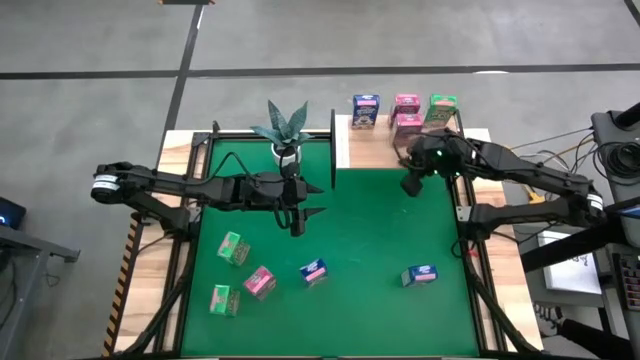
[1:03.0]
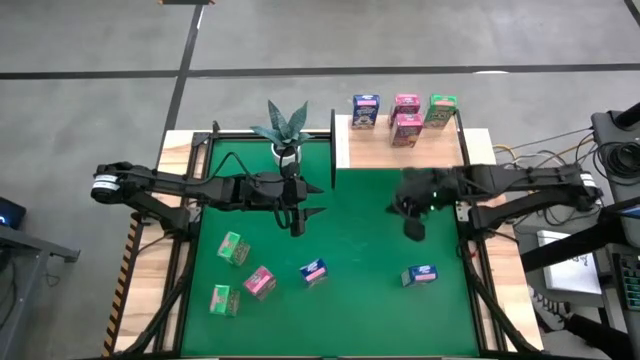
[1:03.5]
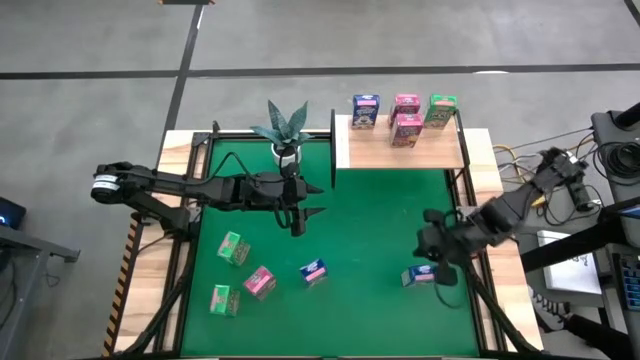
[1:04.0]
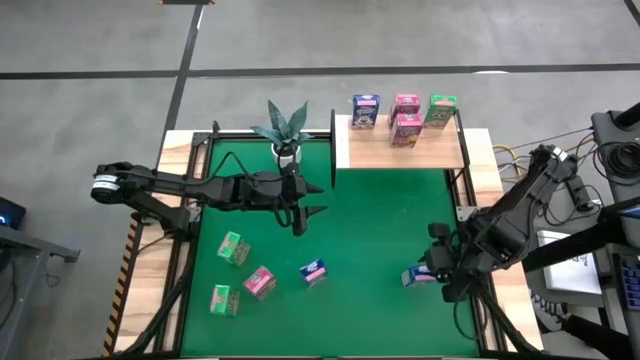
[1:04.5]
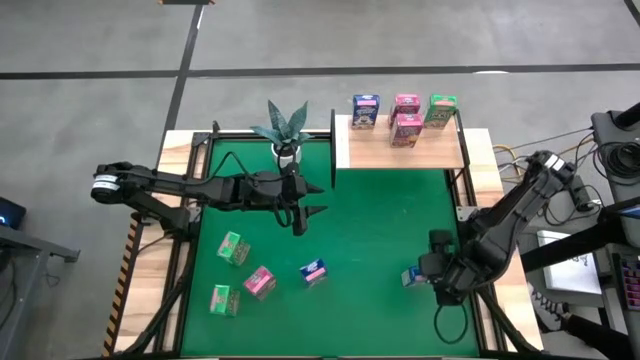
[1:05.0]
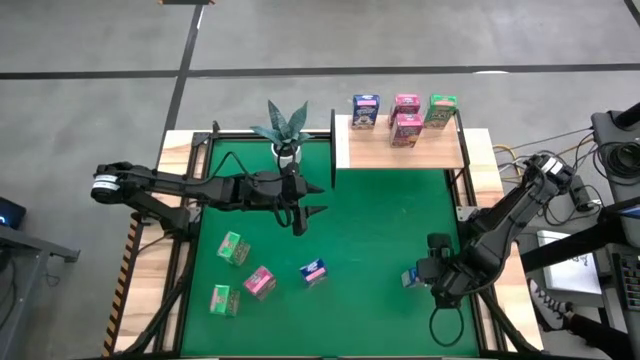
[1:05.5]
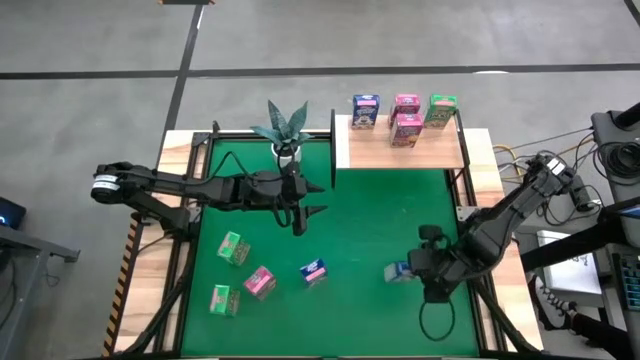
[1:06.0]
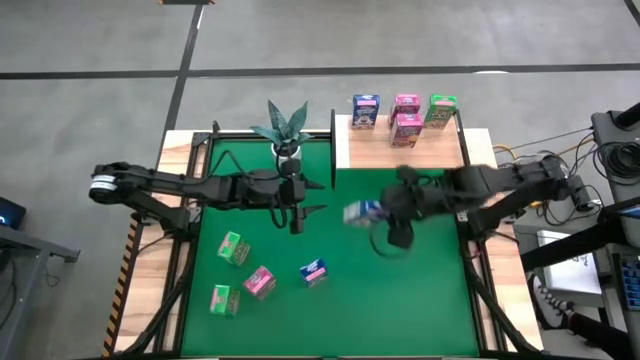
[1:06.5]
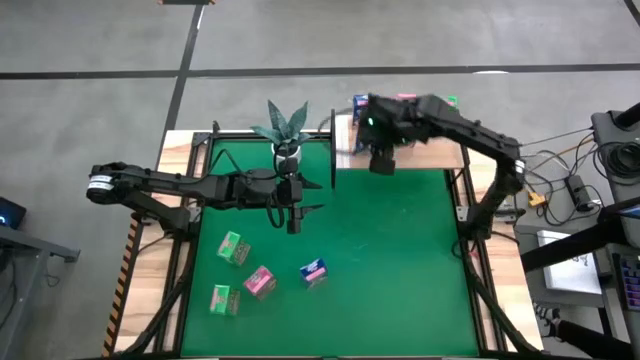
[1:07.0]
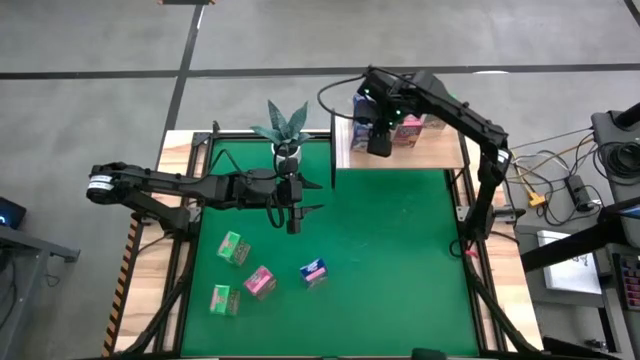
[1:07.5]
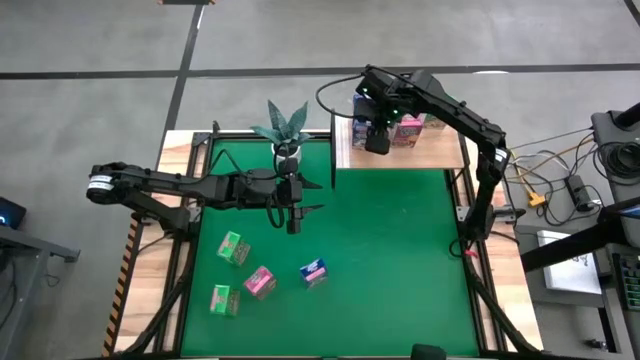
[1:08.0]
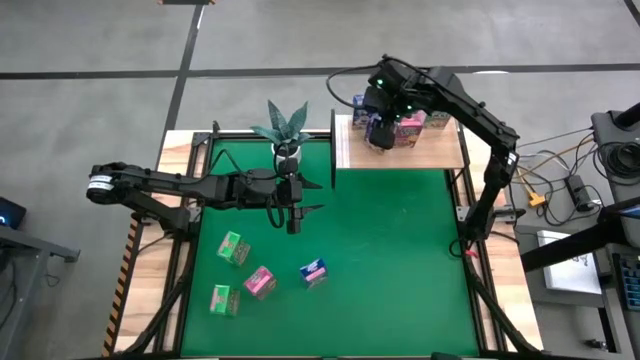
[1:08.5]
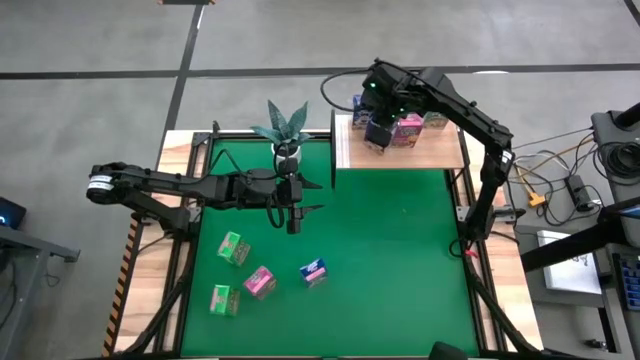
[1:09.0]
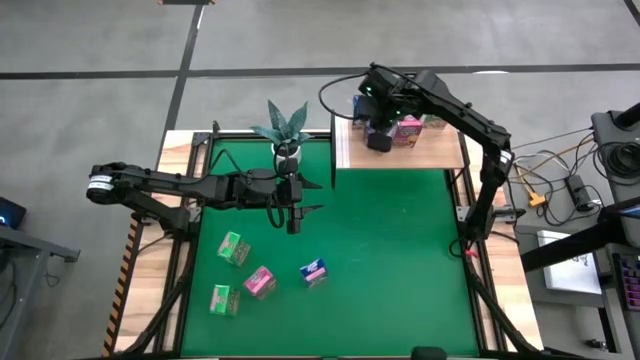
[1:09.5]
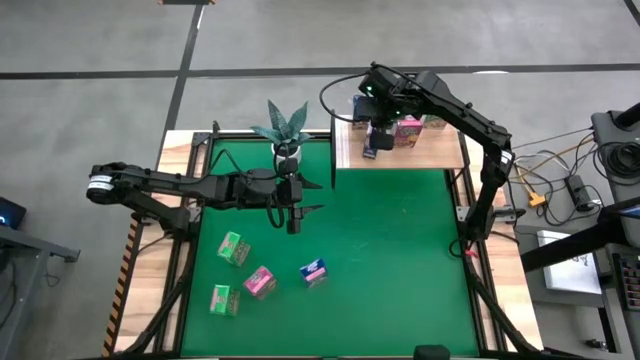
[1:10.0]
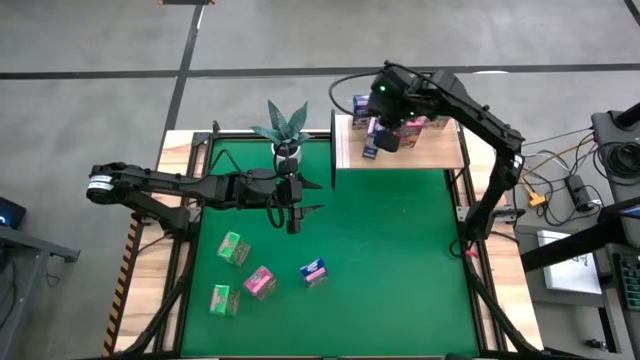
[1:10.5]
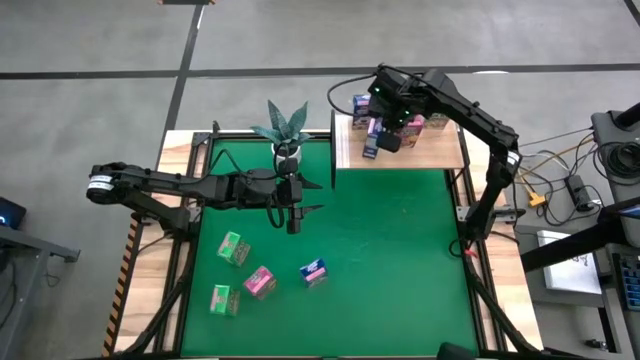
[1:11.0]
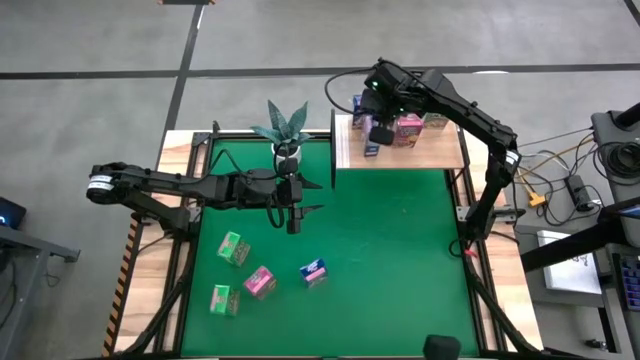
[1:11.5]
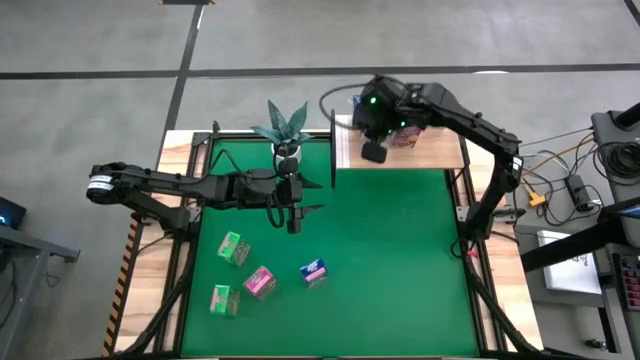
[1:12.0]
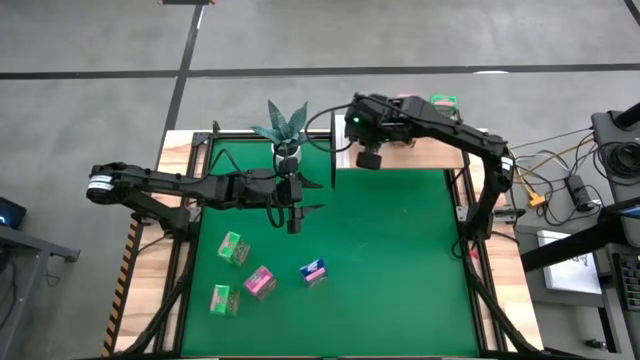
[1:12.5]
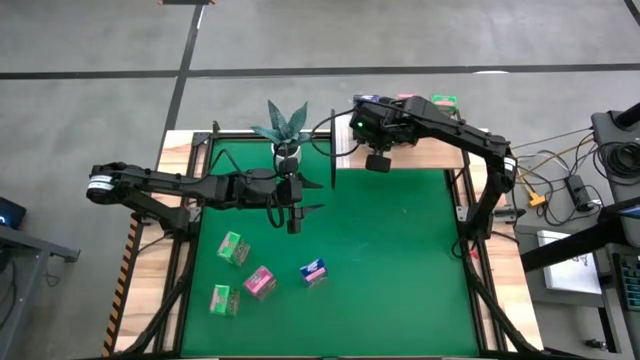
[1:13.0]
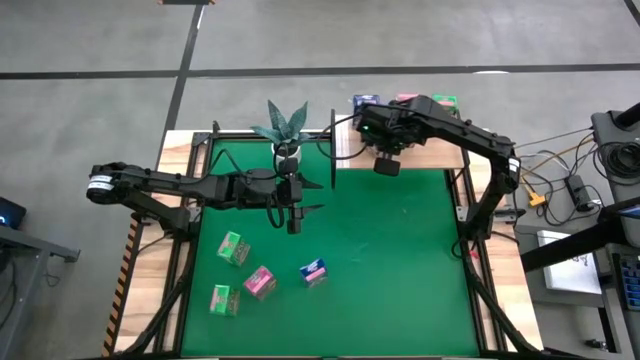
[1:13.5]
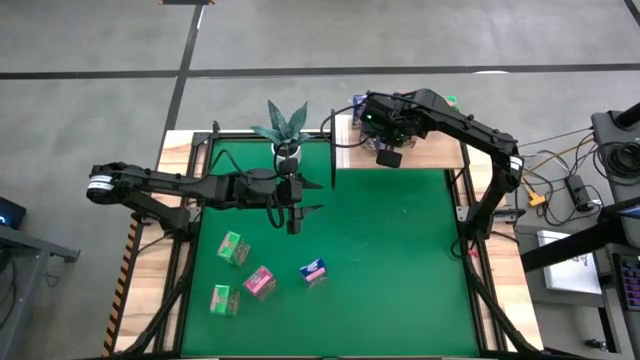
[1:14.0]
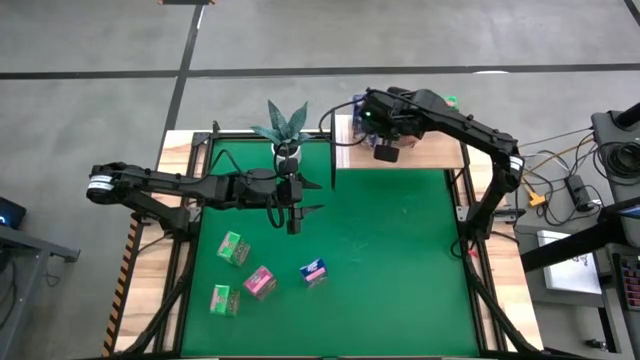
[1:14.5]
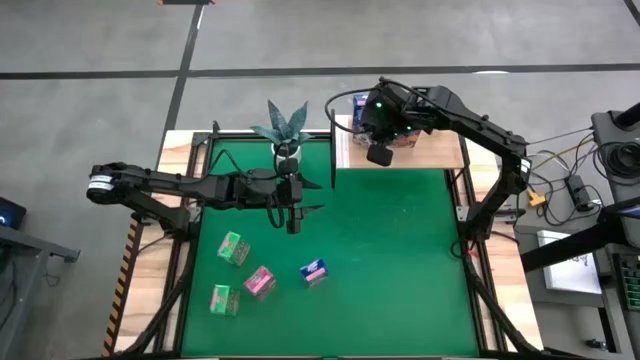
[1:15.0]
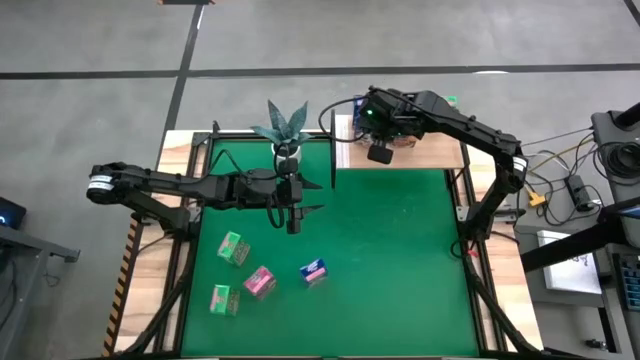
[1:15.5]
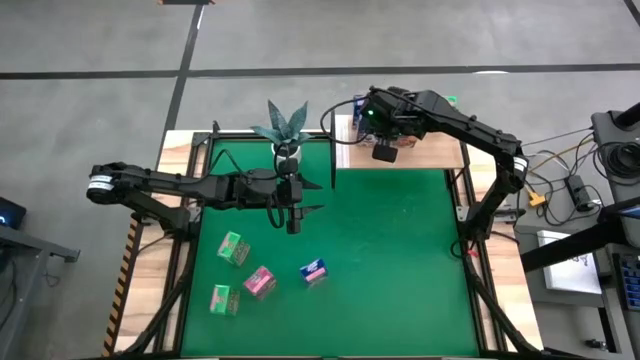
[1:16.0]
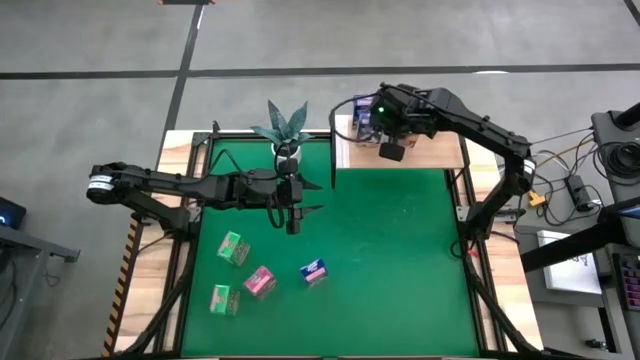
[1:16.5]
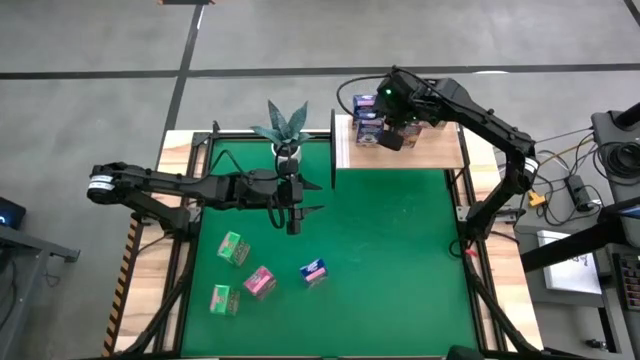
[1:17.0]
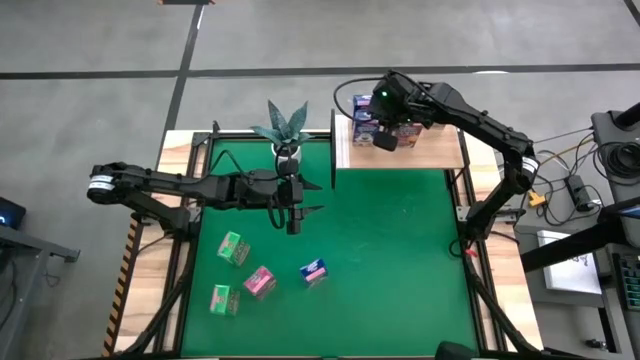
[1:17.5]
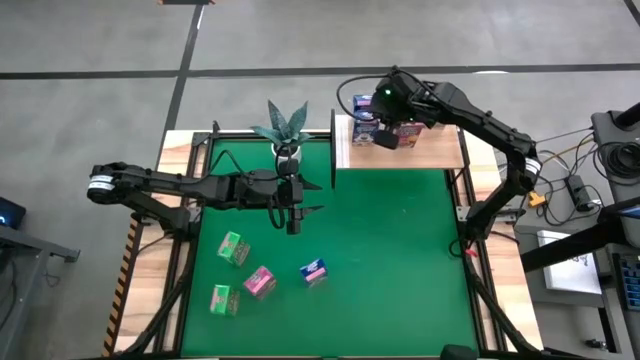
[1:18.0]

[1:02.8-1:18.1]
Task: Stack cereal on shelf
Put the right blue cereal box on the shelf aligned with the other blue cereal box

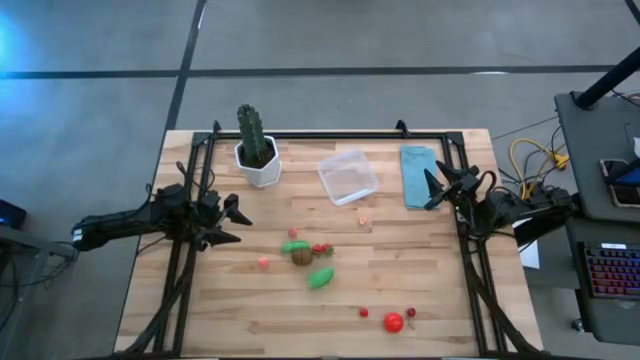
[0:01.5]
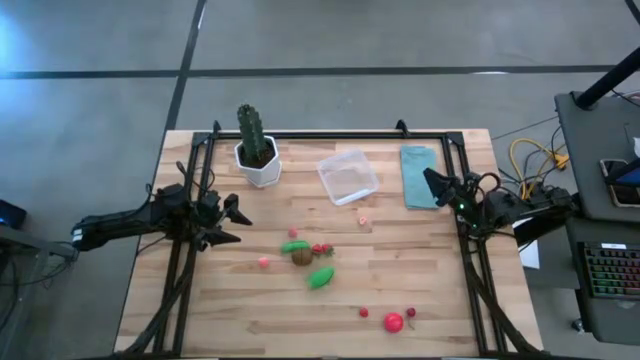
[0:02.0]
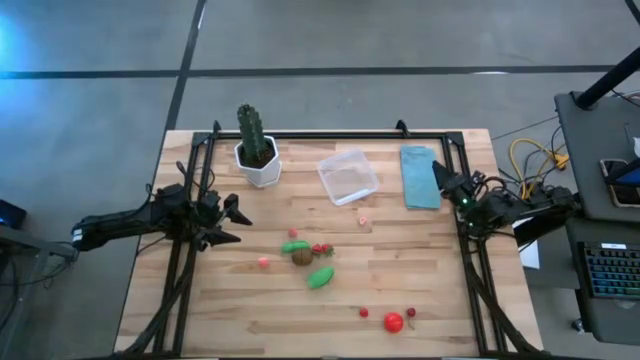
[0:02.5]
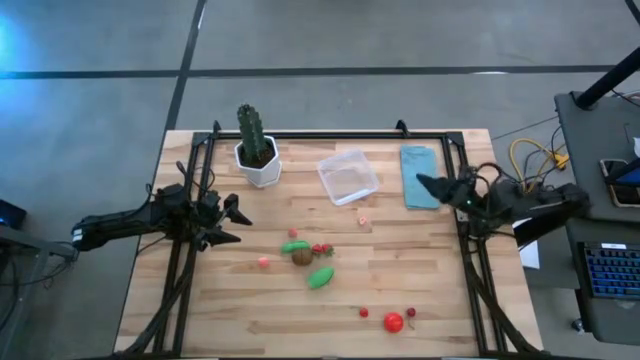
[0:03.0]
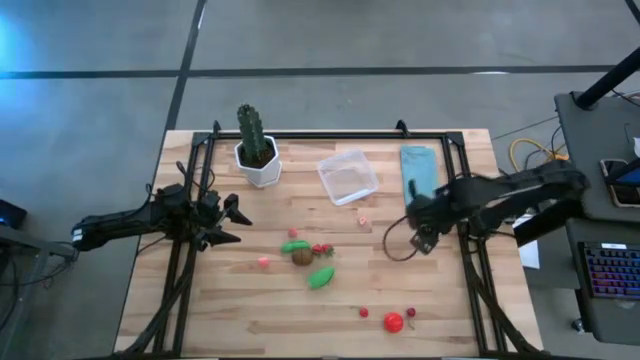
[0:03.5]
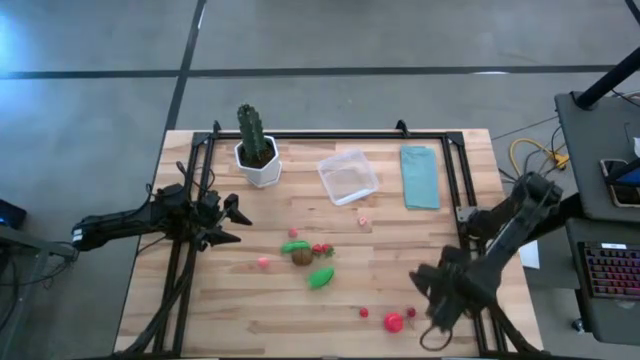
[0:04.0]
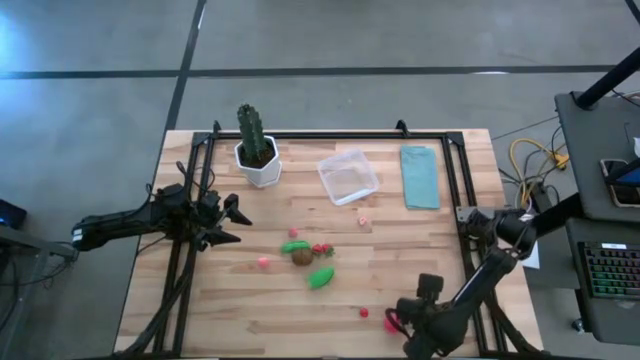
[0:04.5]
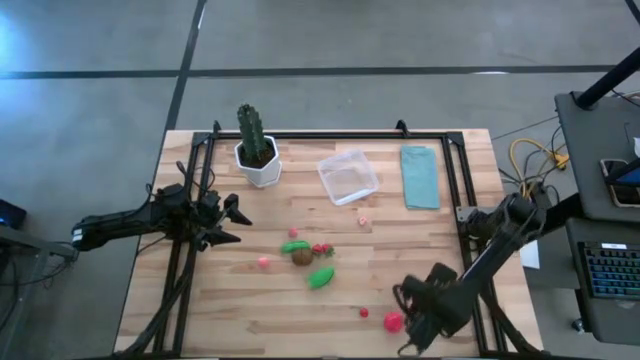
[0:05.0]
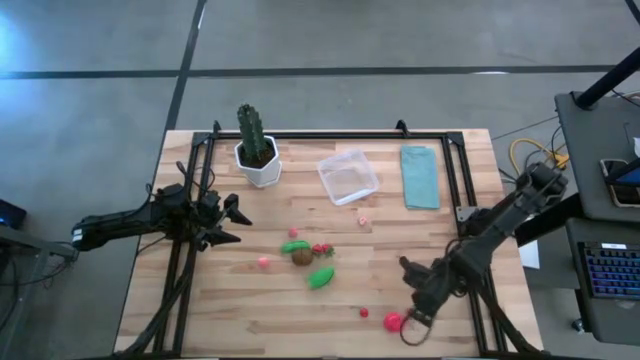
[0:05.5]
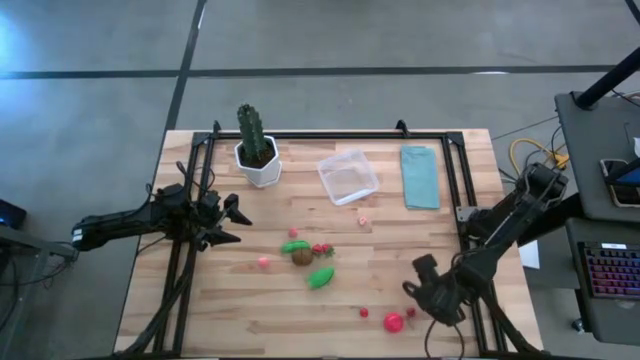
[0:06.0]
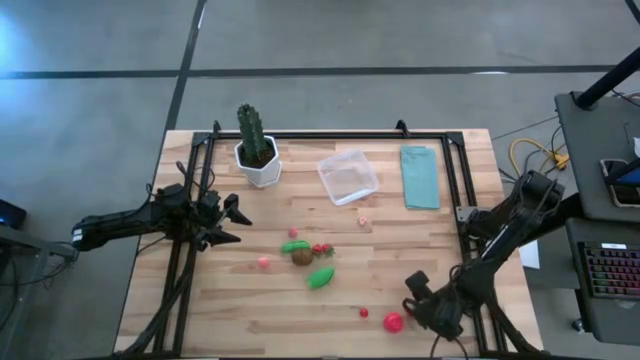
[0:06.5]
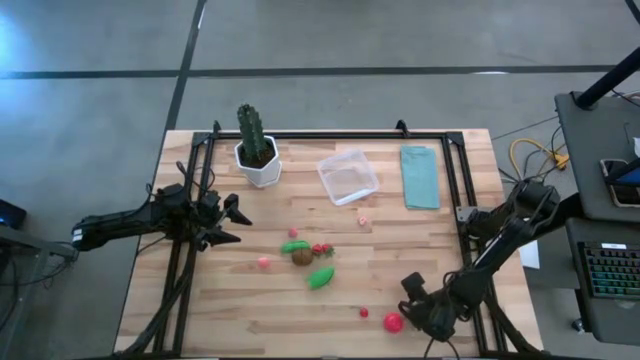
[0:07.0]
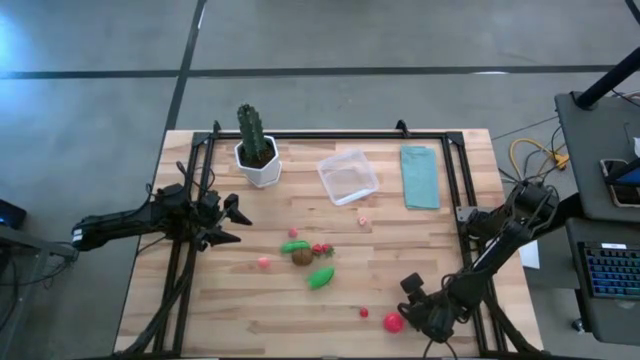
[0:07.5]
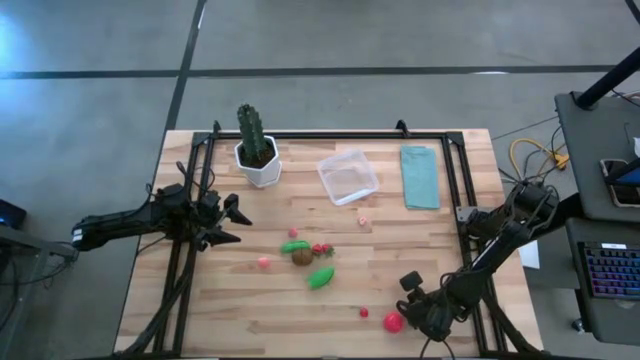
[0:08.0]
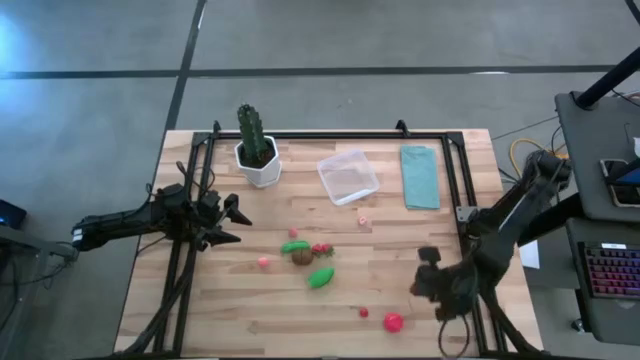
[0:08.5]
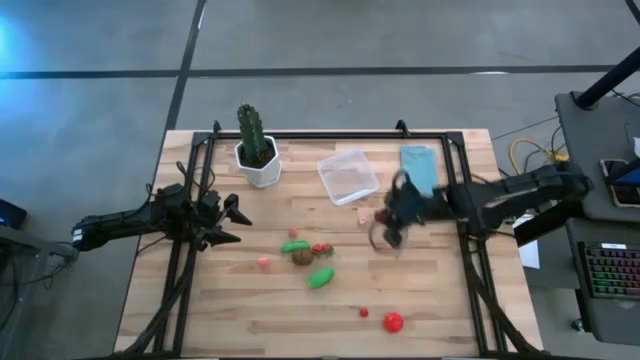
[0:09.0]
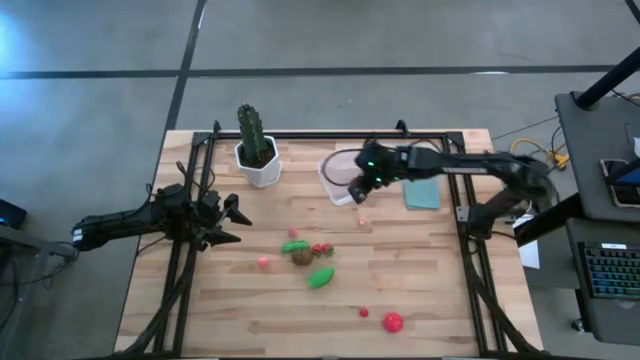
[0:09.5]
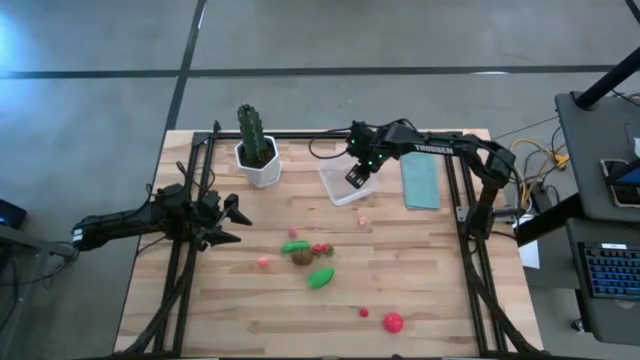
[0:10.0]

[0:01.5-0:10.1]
Task: Pick and placing Produce into tupperware
Put the right cherry into the transparent bin
